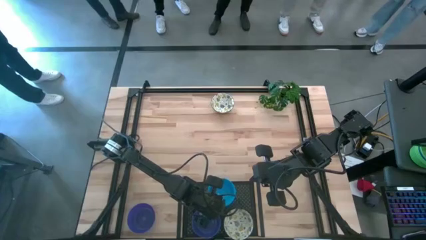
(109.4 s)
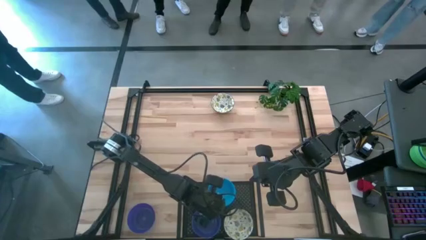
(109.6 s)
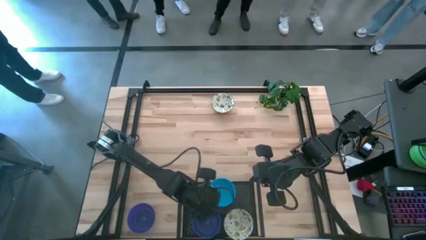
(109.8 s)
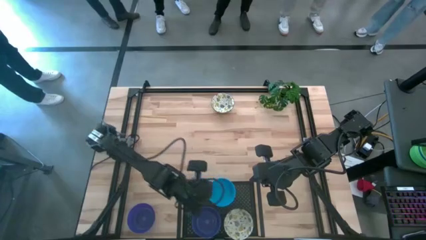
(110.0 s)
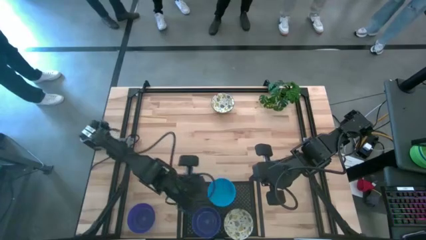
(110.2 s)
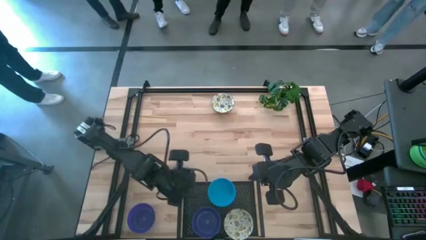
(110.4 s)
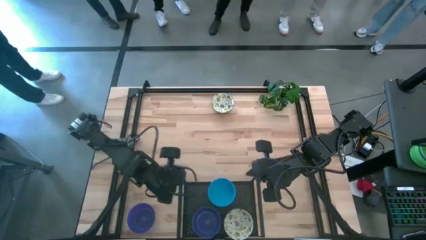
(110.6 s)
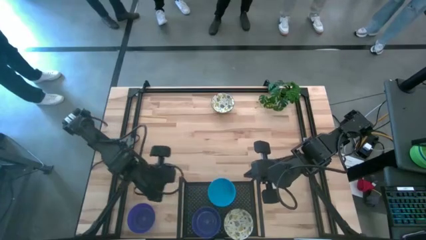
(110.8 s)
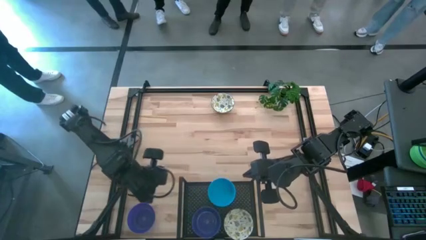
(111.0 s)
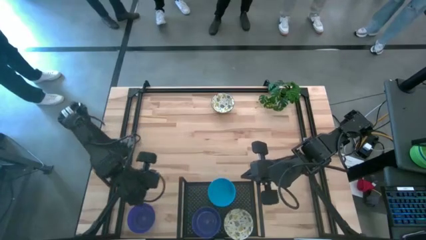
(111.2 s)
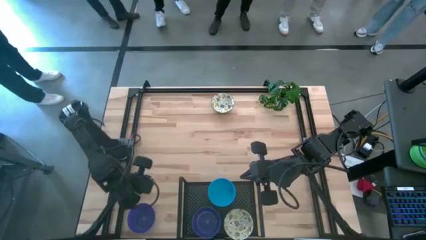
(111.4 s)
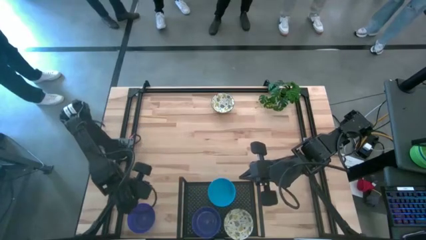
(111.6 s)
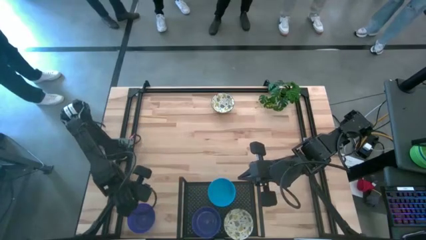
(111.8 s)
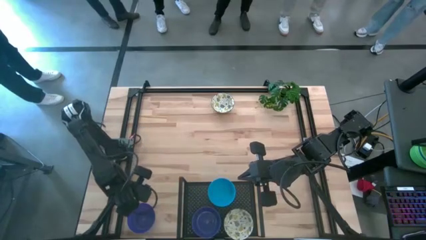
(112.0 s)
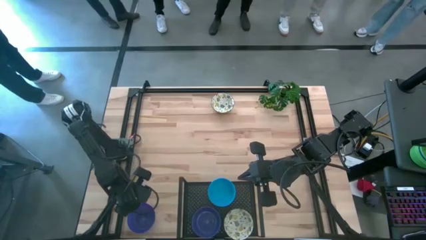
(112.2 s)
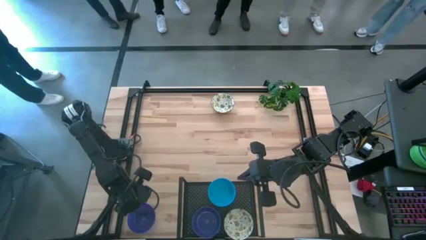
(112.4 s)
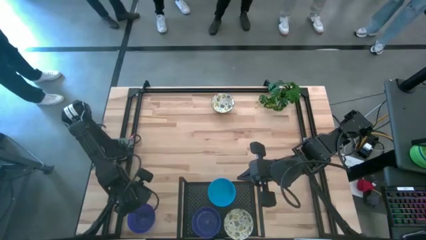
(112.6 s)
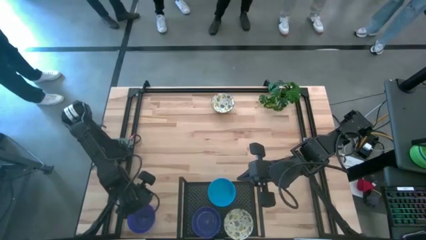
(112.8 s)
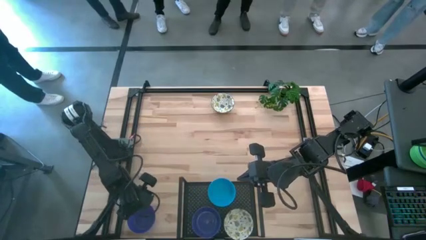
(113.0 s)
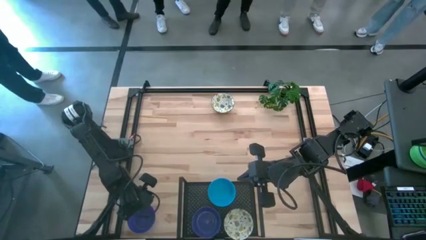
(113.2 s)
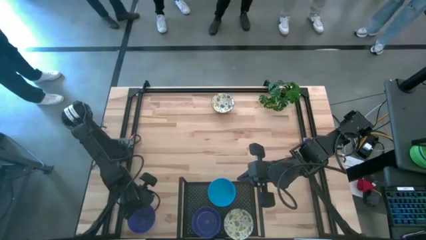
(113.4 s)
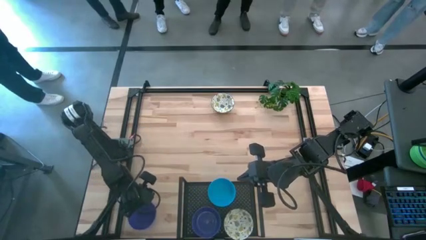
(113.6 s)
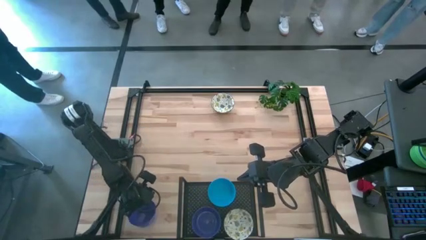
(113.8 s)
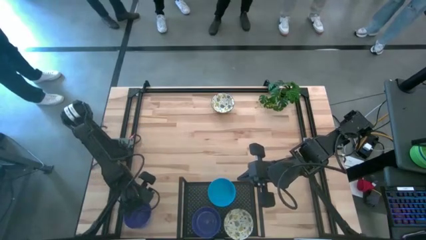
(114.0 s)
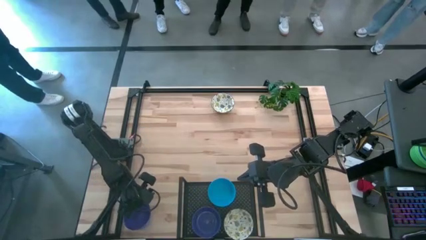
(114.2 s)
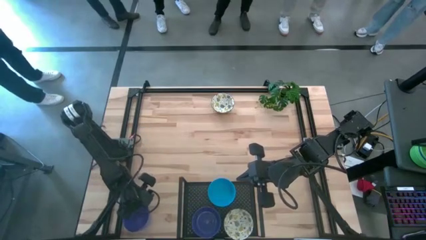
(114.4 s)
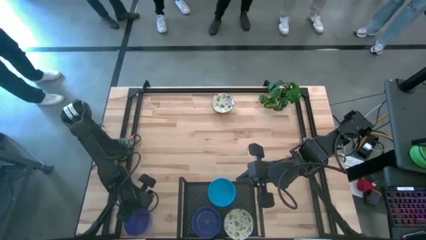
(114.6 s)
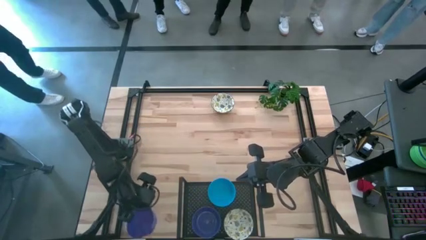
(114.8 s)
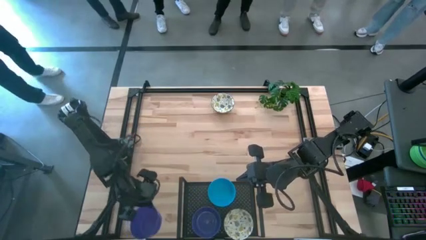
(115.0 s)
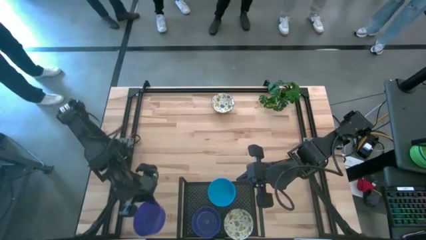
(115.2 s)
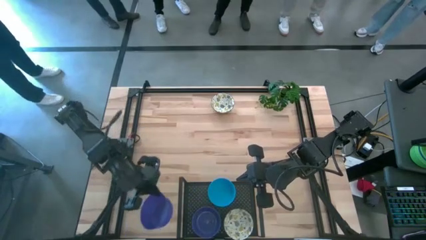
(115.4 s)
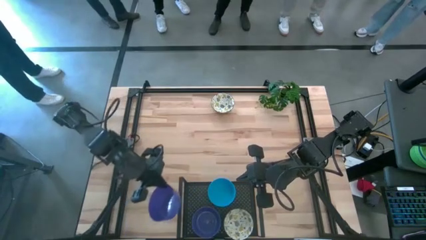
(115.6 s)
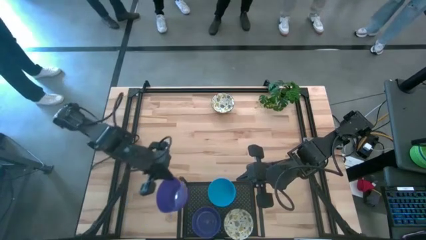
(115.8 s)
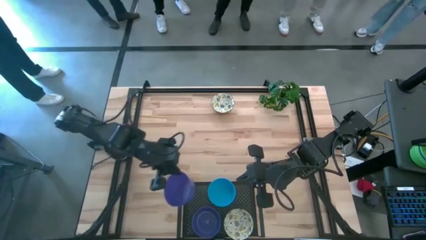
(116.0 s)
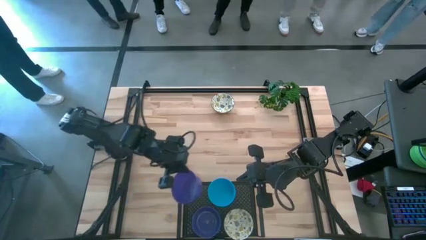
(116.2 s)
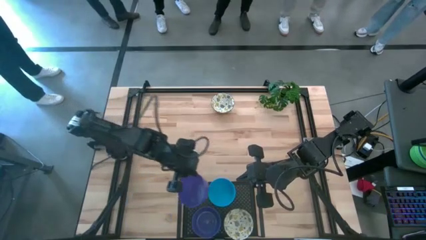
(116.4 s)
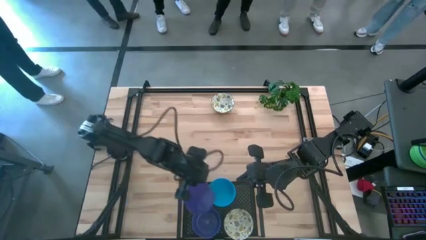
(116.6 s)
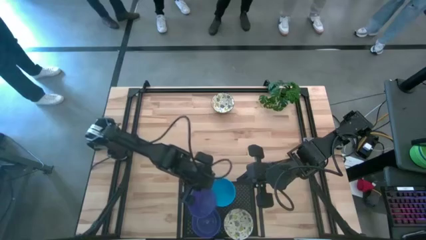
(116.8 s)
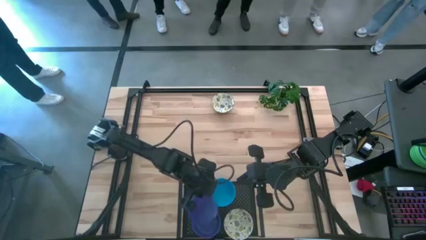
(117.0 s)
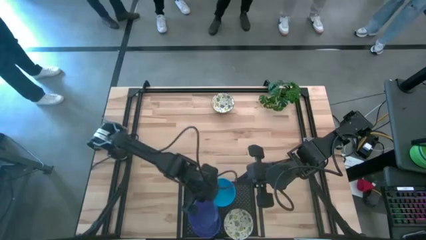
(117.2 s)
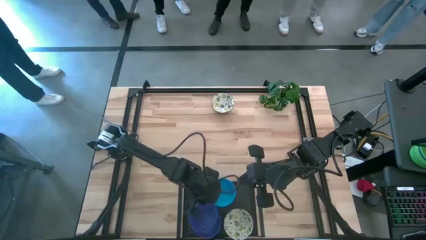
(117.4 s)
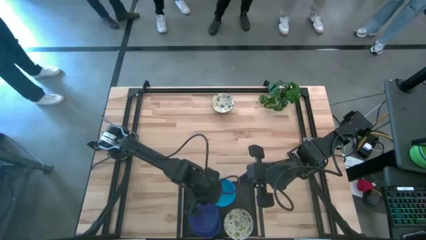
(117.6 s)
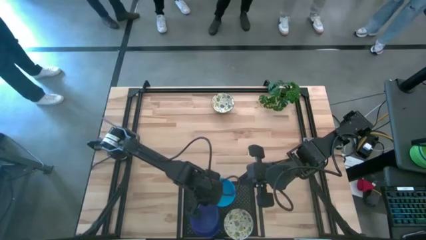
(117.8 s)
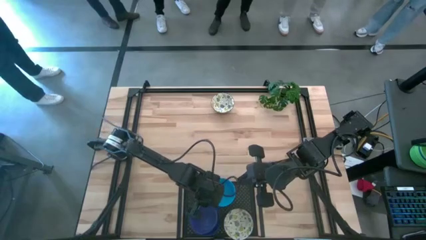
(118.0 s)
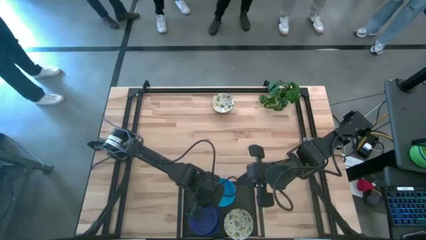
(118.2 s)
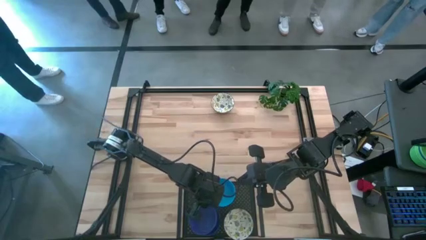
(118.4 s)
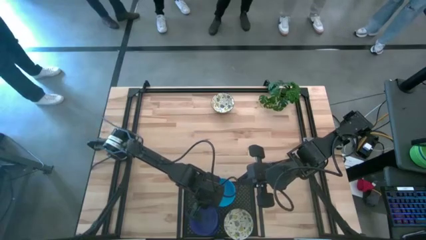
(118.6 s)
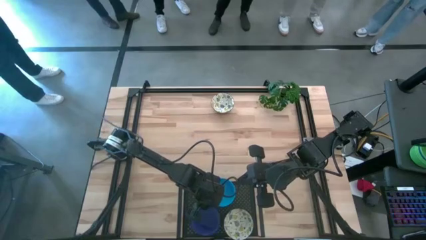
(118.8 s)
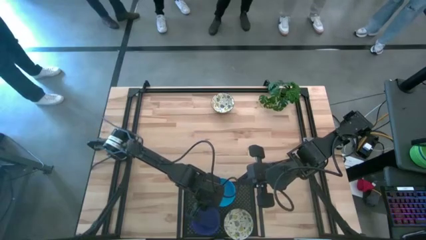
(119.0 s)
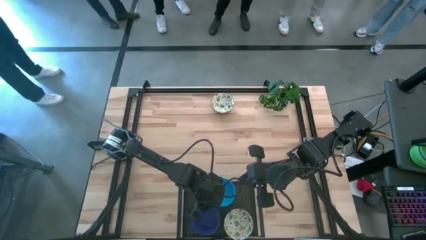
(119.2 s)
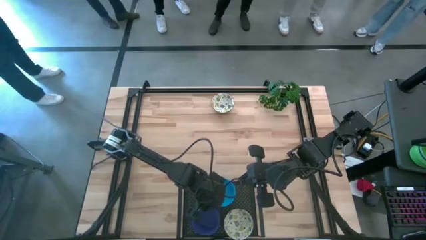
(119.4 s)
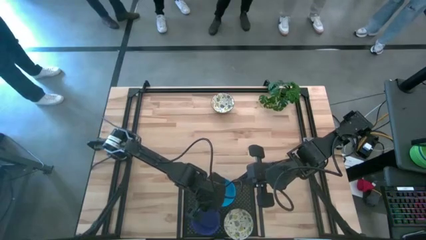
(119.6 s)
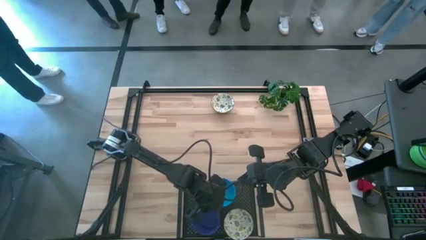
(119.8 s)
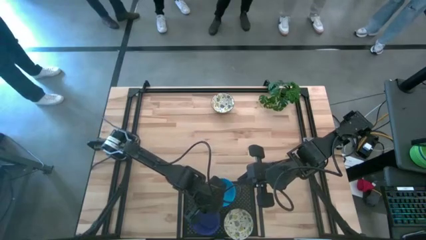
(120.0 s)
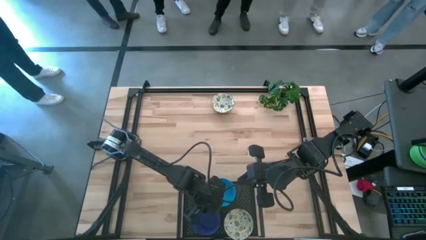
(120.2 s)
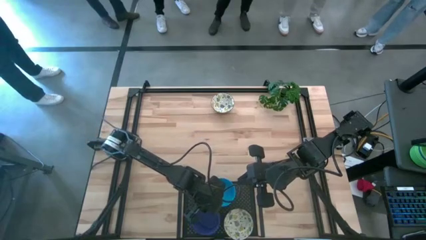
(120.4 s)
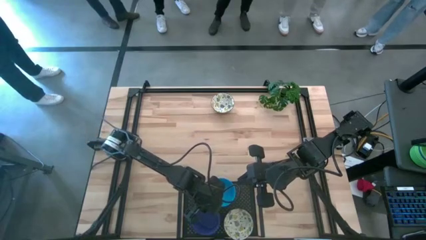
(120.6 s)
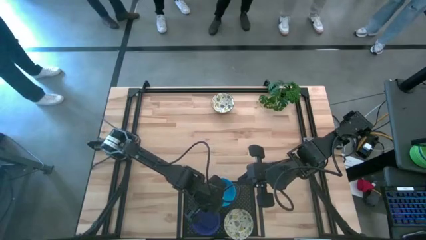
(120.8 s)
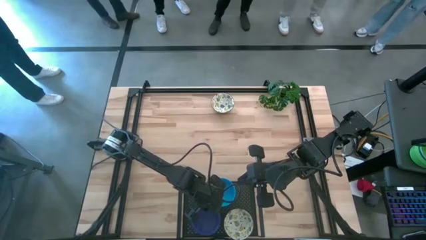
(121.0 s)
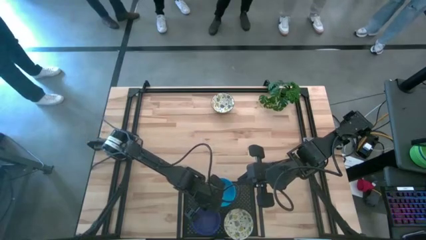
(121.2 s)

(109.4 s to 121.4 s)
Task: Pick & Place Mini bowls
Stack the violet bowl on top of the violet bowls on the shelf
